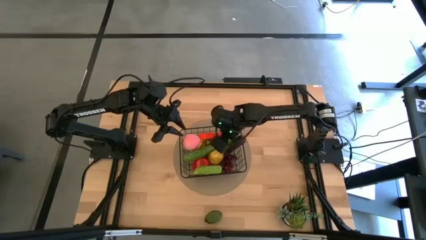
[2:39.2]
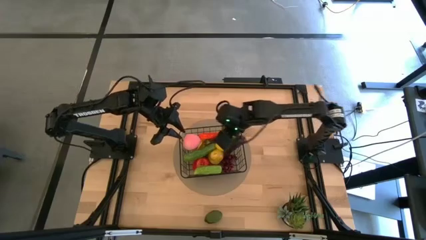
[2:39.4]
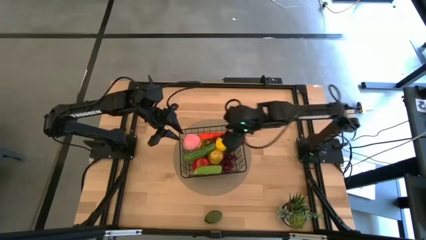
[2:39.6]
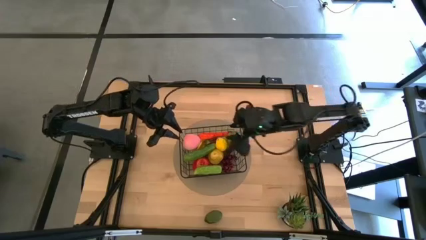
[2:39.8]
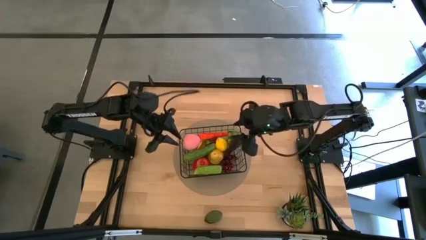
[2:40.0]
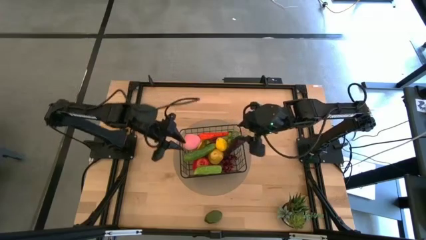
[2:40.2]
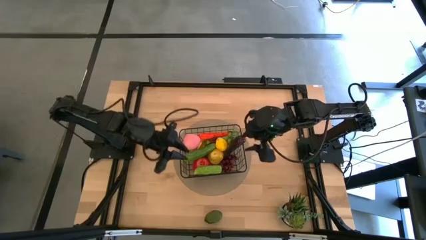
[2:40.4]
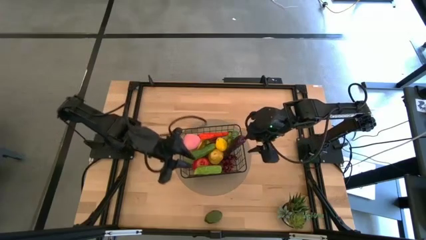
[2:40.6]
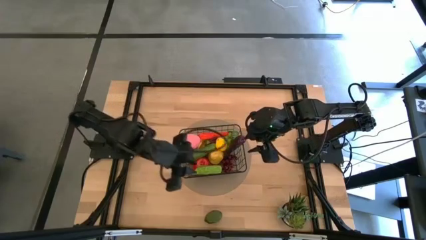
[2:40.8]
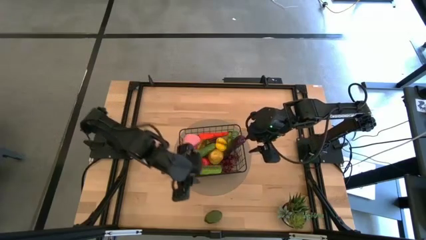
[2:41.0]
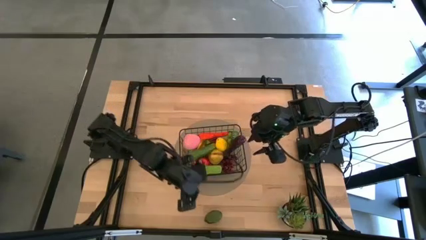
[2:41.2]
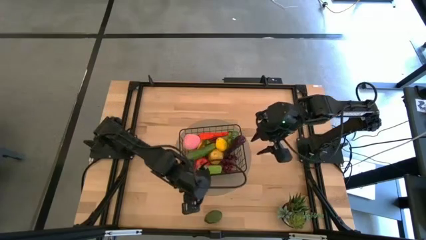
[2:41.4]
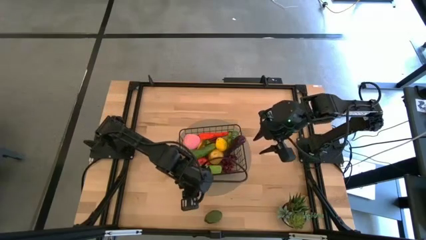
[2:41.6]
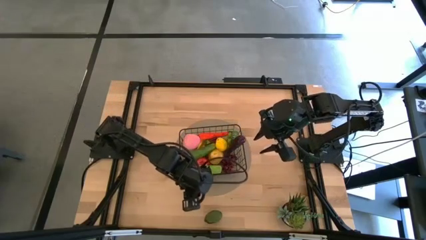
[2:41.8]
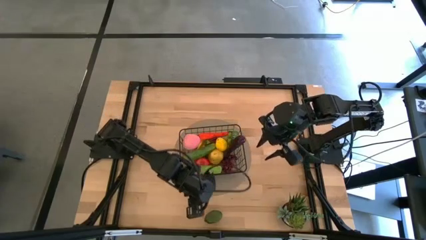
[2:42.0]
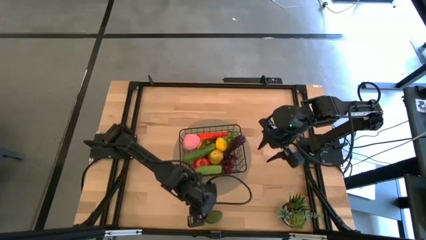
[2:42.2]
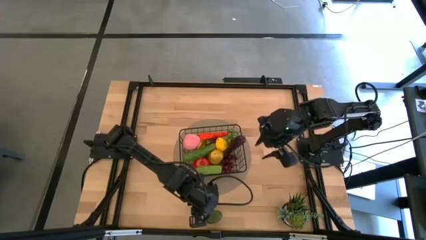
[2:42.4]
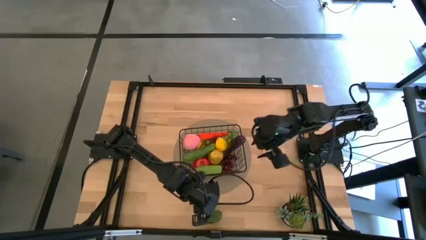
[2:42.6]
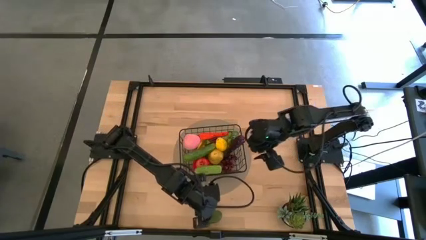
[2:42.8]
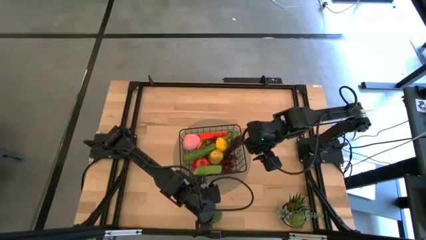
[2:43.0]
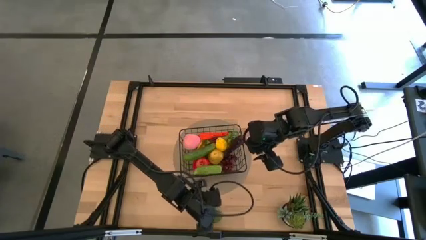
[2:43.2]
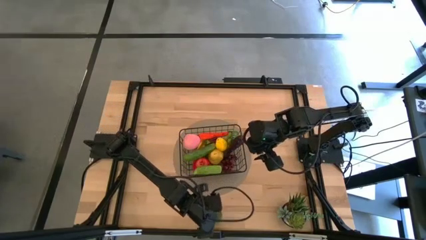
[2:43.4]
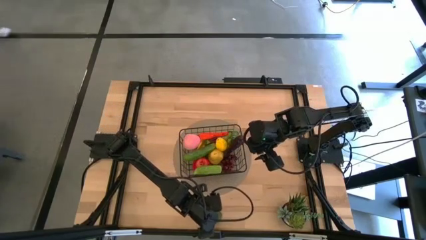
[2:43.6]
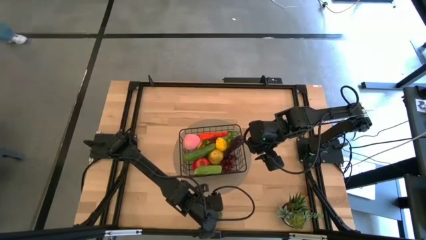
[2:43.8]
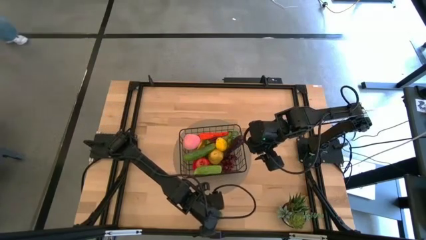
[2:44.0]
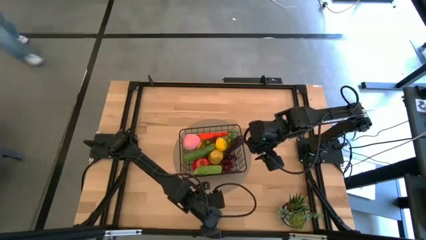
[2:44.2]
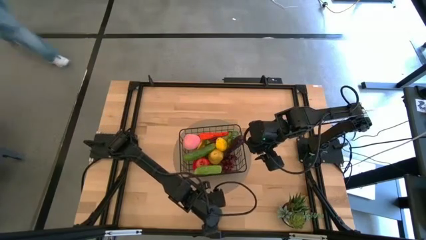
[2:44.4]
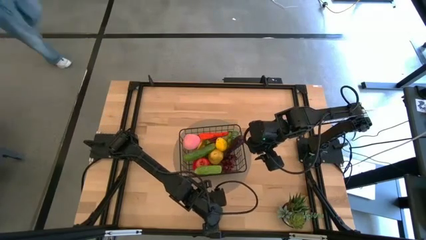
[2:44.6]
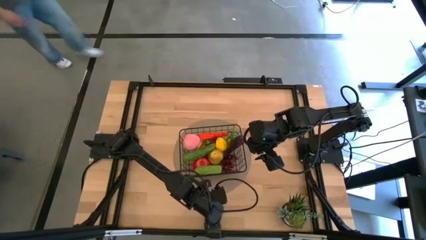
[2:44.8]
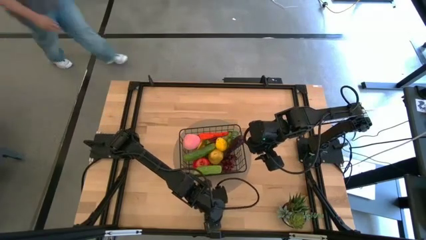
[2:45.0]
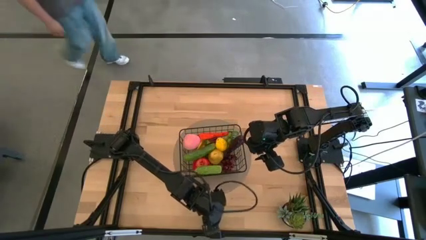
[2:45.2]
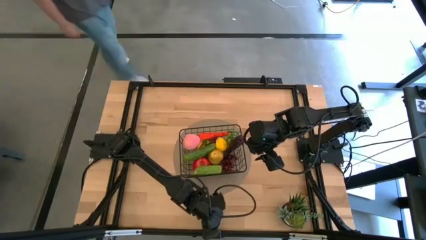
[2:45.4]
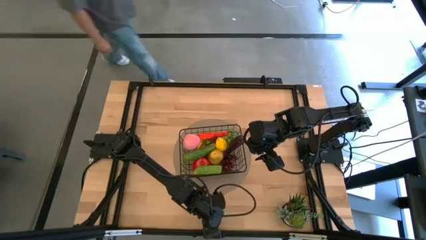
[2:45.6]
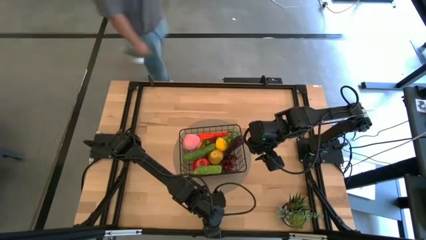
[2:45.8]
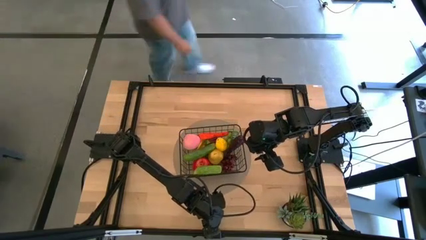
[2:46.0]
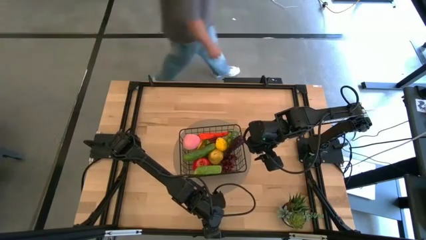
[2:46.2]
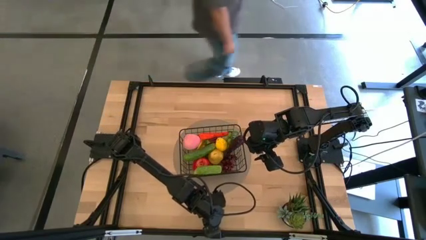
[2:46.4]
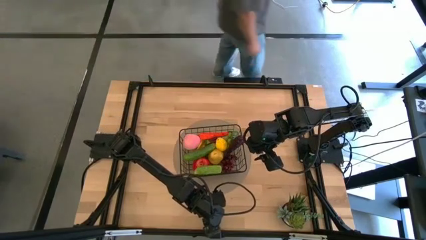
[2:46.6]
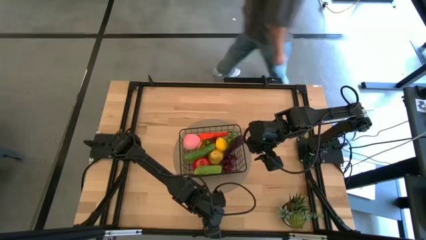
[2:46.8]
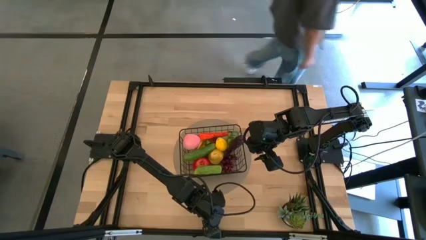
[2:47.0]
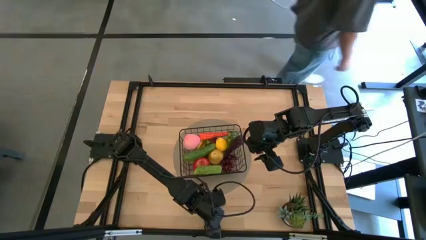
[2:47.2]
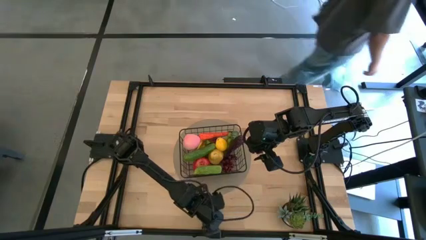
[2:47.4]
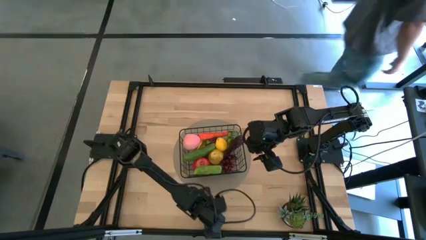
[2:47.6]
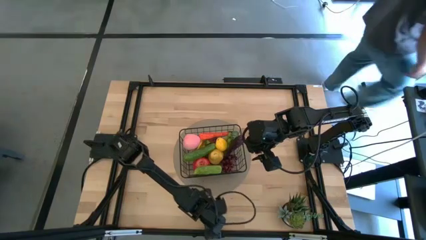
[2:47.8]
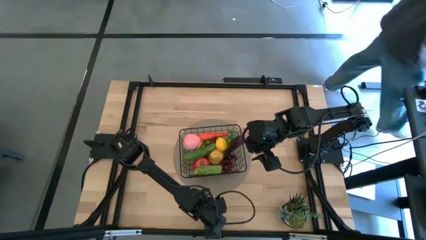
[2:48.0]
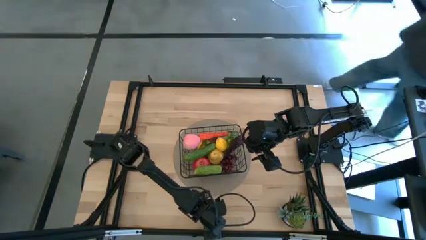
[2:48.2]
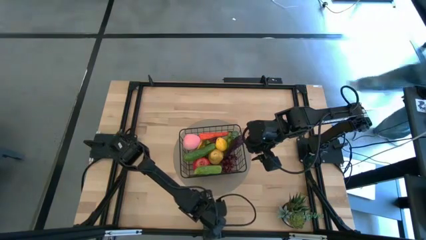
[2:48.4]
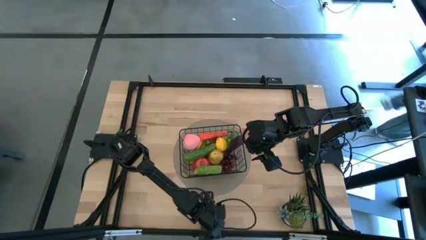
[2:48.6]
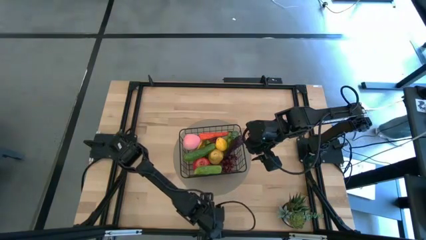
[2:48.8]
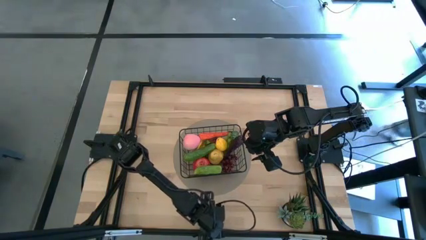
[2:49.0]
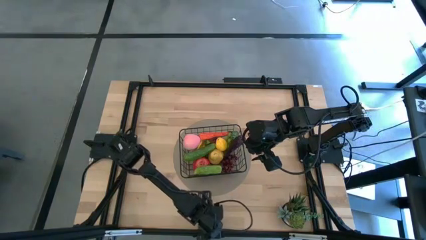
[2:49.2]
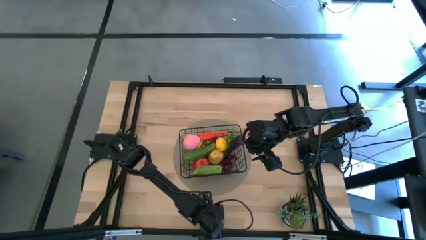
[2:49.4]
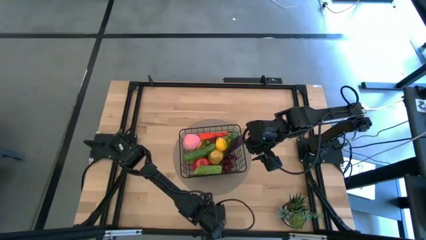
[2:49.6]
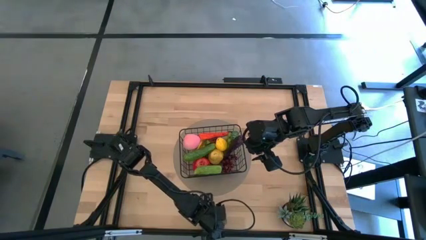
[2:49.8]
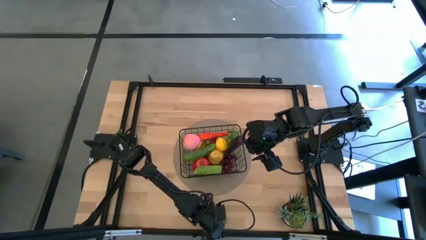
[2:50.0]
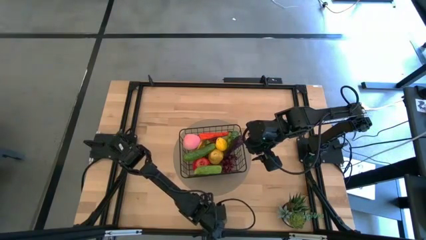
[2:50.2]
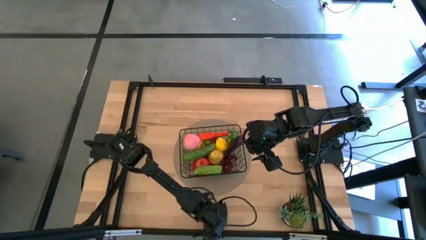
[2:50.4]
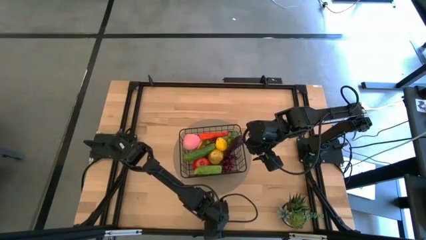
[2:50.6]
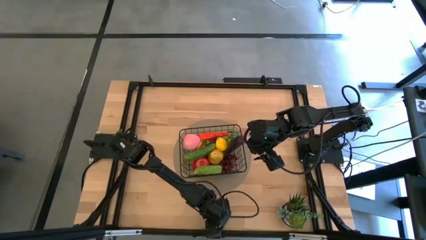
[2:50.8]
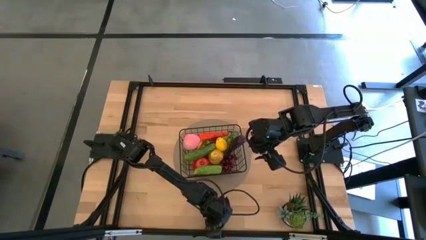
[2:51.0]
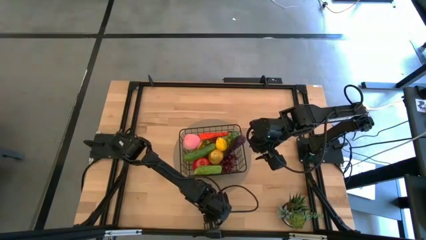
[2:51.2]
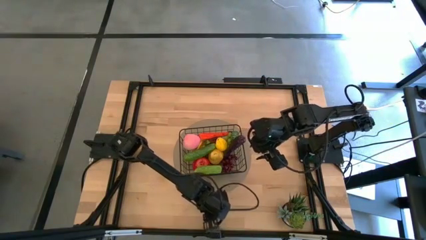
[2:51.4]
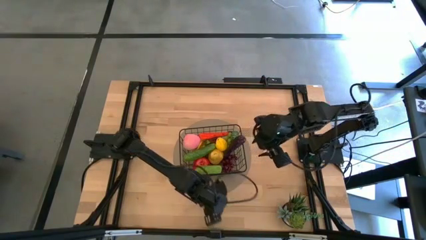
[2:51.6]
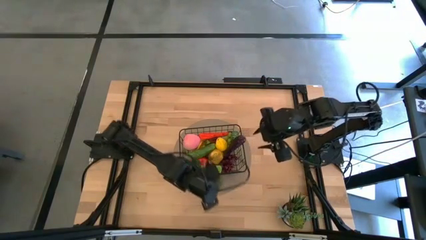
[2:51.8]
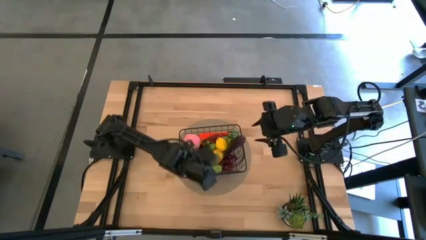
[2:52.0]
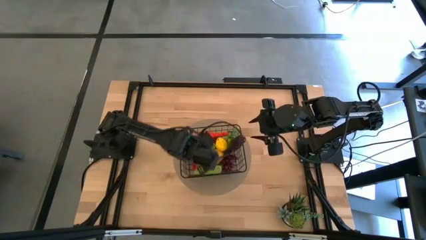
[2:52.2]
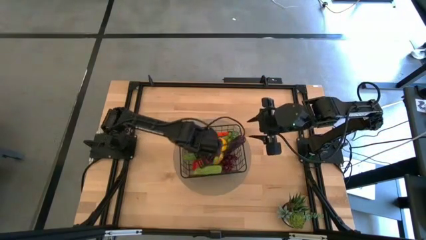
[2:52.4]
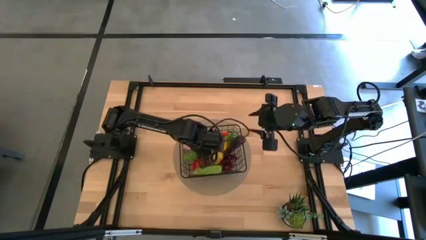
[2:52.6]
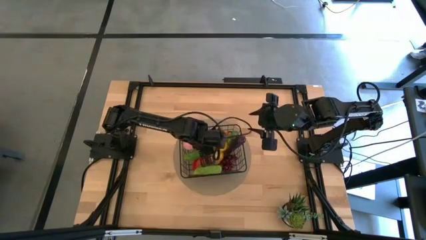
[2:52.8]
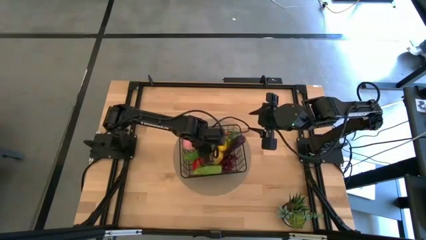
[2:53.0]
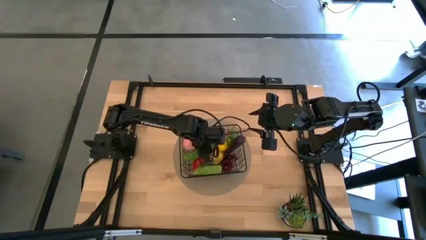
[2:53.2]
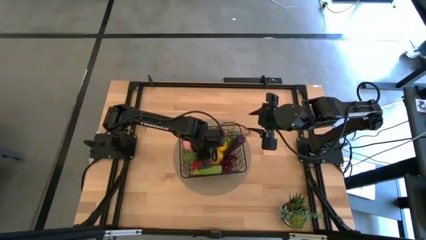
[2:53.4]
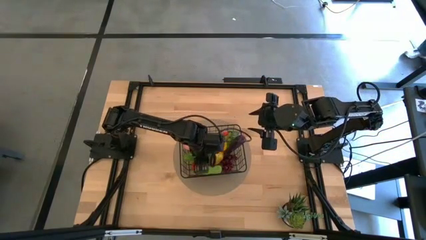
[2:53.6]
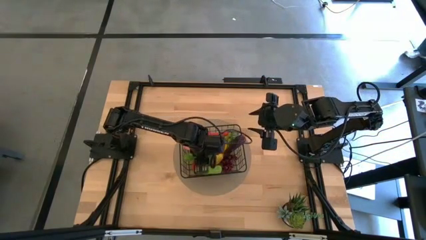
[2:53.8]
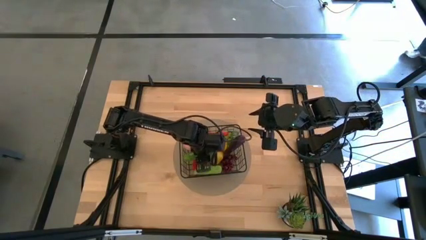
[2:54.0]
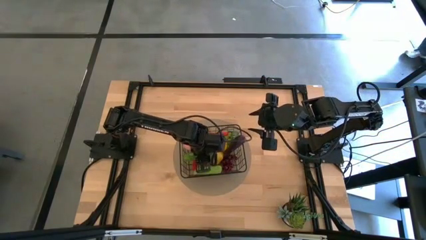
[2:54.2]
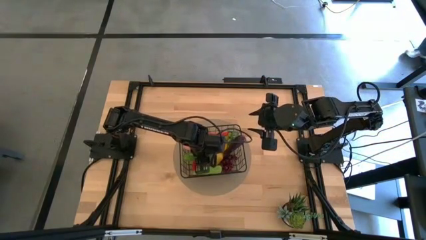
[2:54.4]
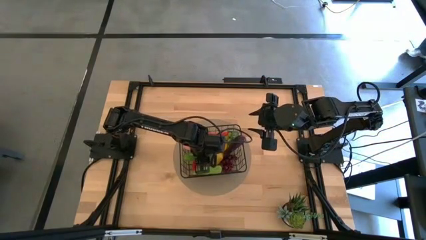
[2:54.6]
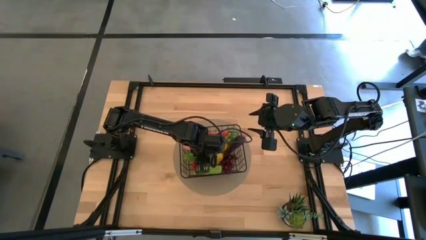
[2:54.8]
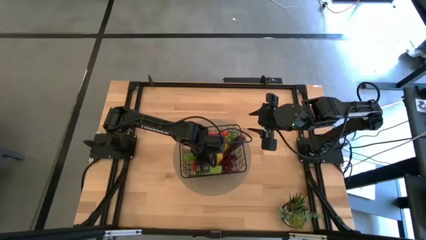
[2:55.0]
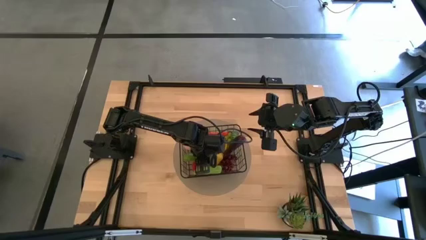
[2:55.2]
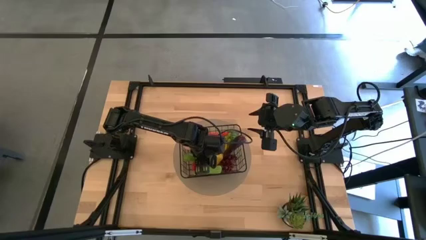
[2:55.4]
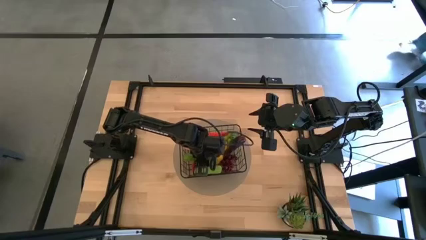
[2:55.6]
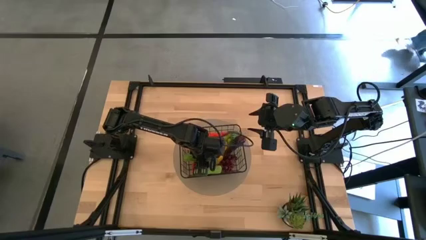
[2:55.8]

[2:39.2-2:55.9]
Task: Build produce basket
Put the green lime into the black wire basket
